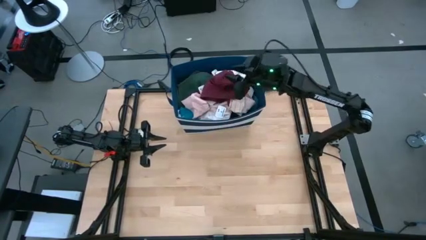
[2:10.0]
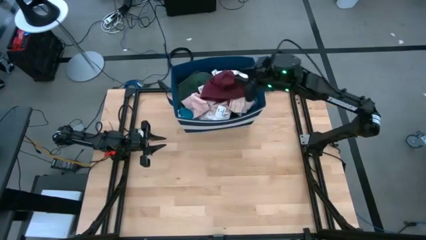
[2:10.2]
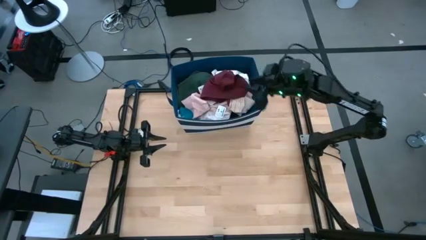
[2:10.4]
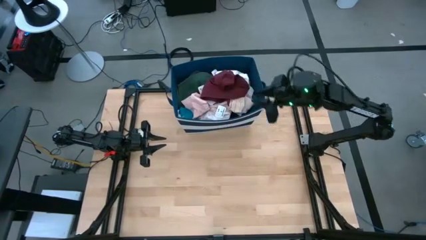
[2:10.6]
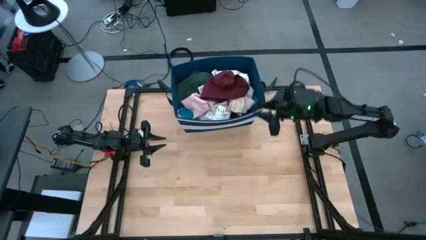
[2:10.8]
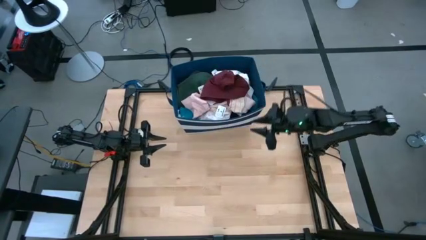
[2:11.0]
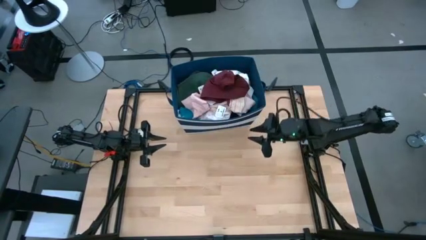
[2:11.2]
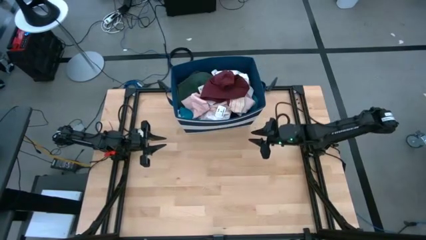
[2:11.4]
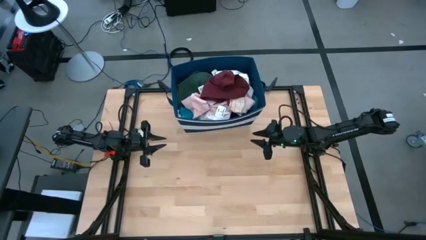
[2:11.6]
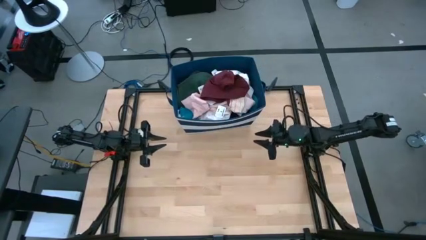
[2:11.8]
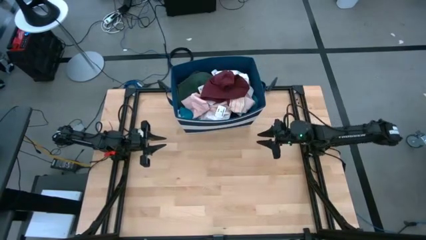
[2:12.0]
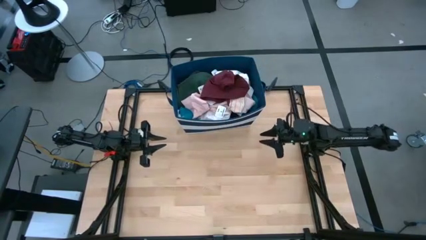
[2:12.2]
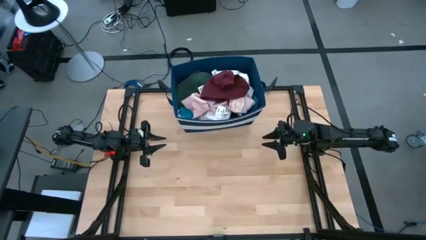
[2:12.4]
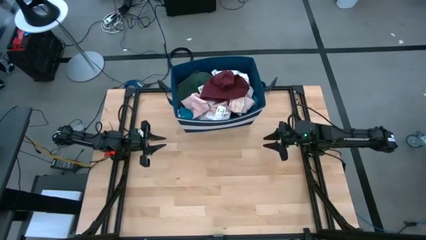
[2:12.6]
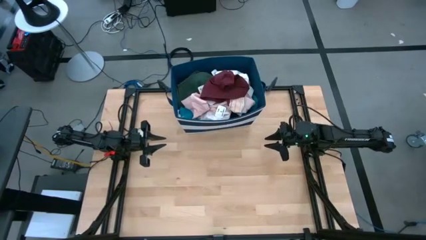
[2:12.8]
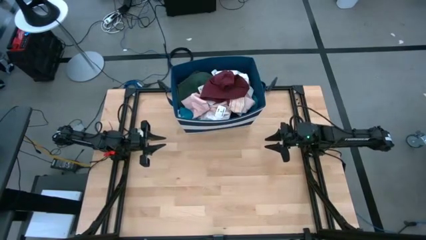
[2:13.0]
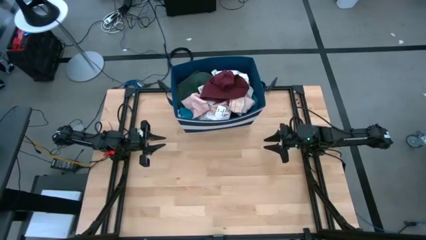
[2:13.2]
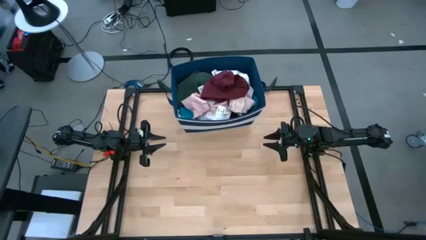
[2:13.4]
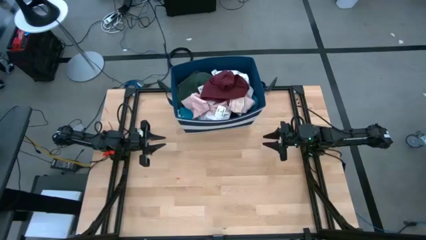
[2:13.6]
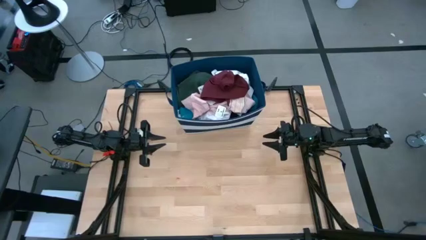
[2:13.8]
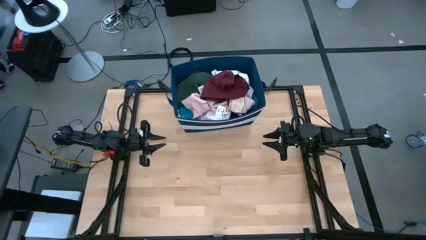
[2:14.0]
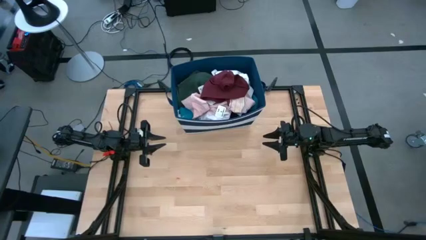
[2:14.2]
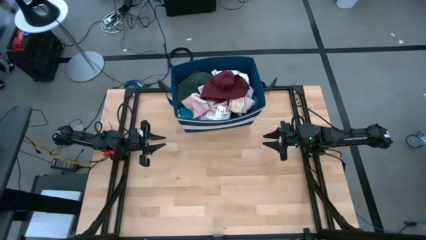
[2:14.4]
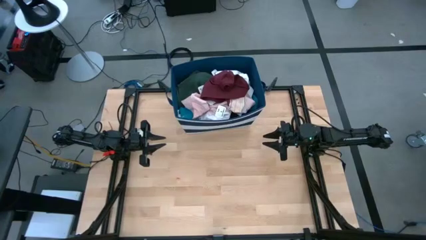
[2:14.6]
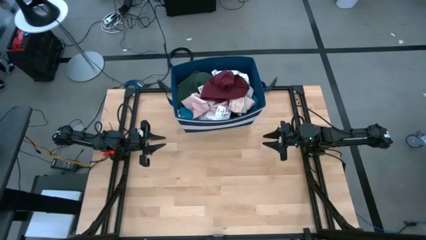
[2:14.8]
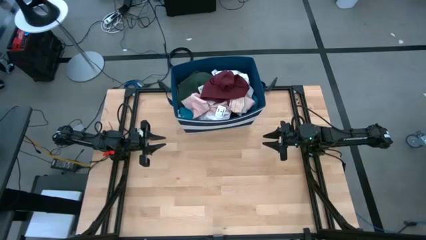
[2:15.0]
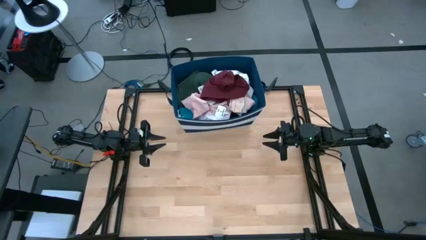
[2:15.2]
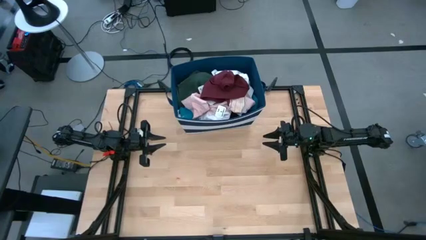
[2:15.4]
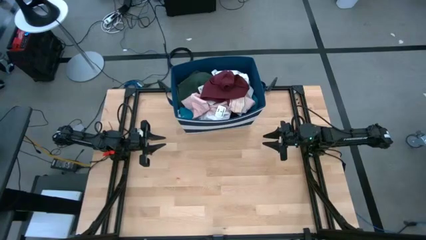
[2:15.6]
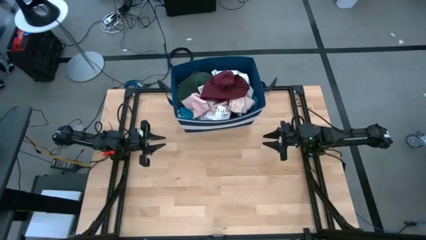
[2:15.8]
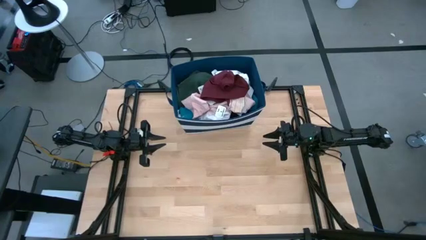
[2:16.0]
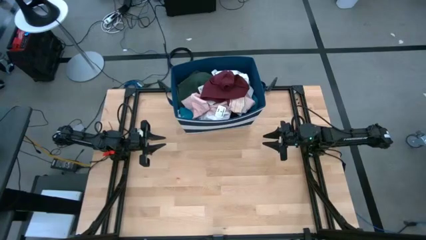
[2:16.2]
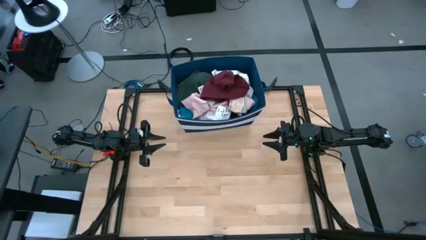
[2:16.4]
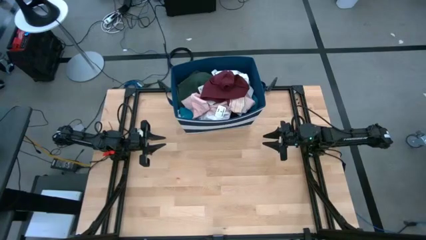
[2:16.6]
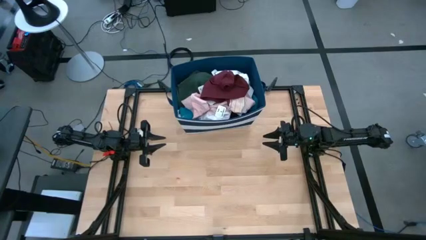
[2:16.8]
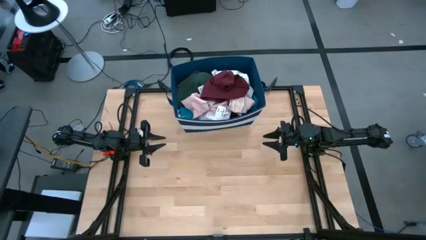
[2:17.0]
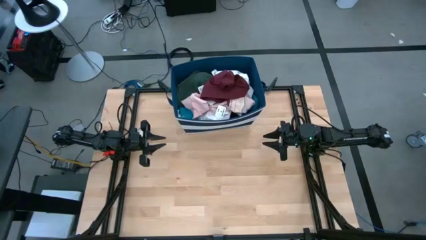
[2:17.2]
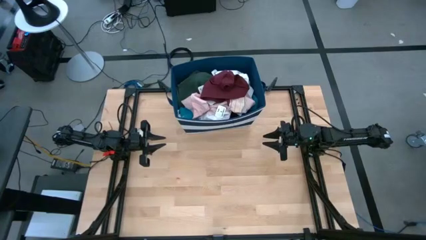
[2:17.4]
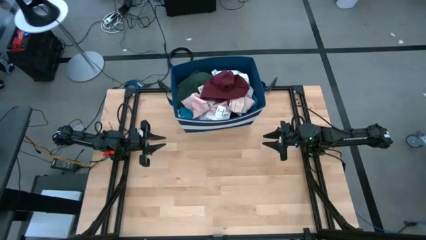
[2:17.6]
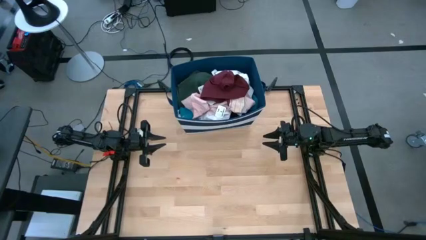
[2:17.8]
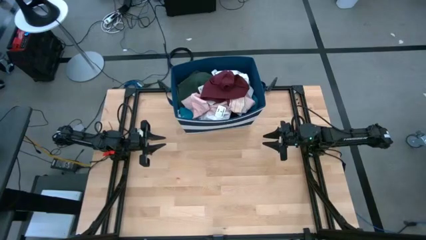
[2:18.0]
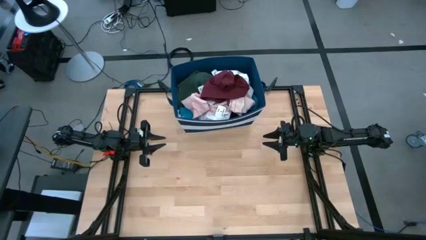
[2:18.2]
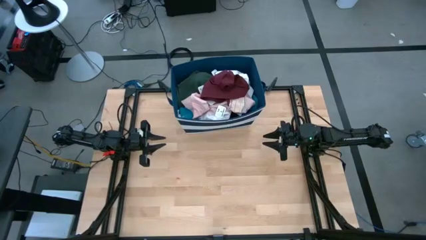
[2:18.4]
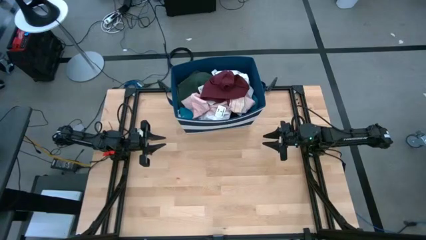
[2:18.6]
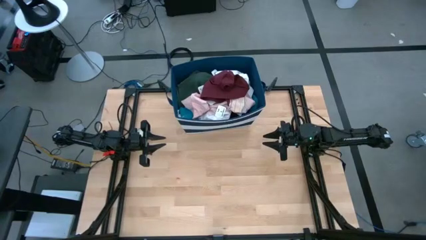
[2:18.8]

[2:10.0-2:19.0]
Task: Sort clothes
Return to Home Position

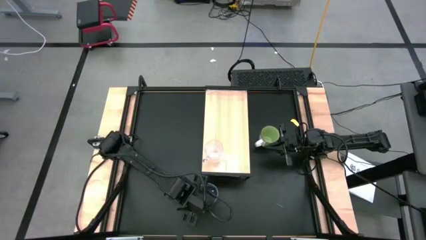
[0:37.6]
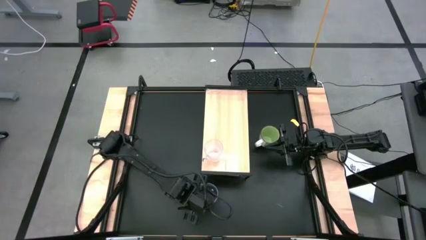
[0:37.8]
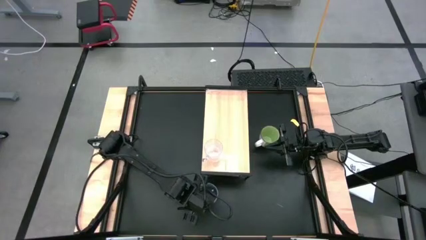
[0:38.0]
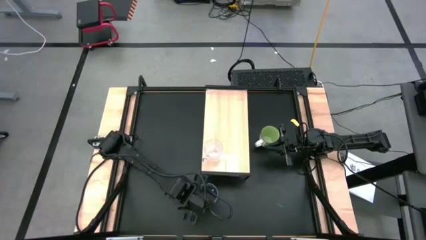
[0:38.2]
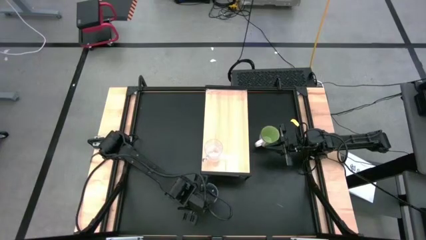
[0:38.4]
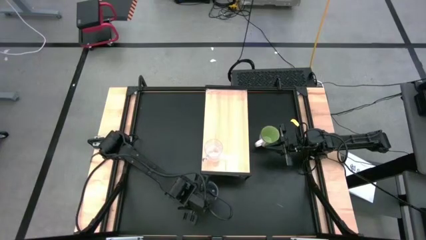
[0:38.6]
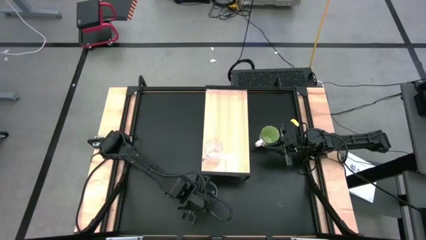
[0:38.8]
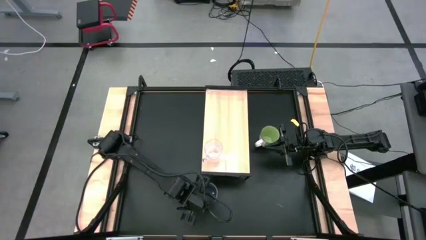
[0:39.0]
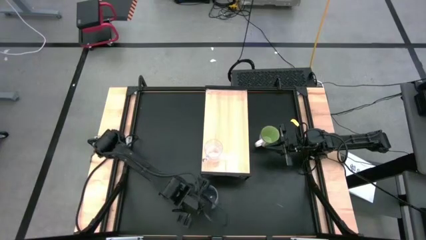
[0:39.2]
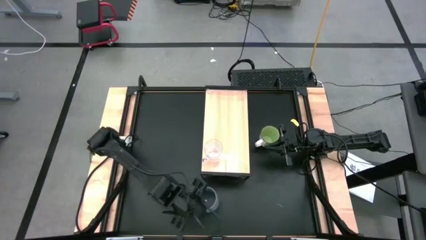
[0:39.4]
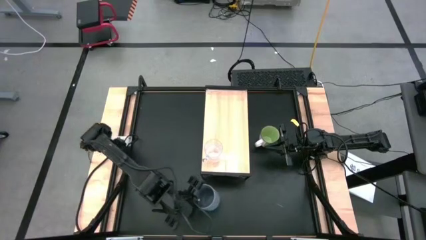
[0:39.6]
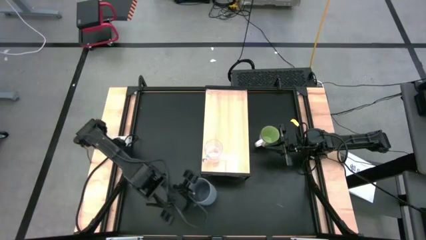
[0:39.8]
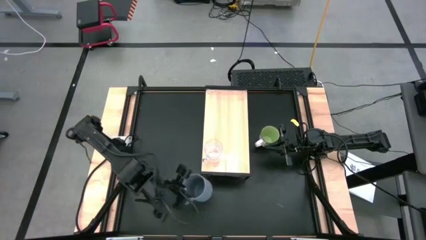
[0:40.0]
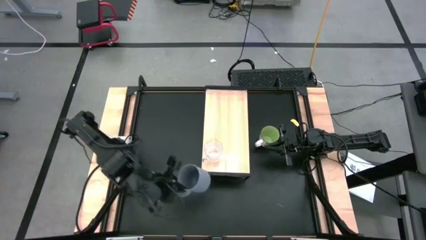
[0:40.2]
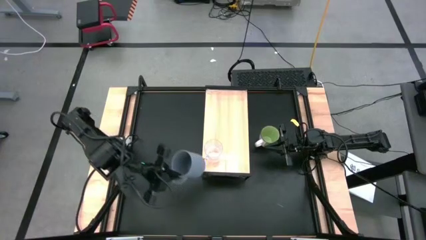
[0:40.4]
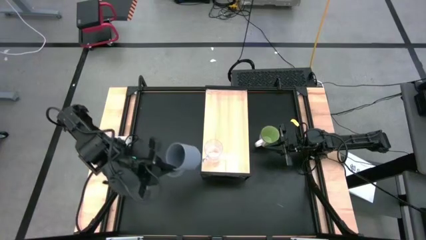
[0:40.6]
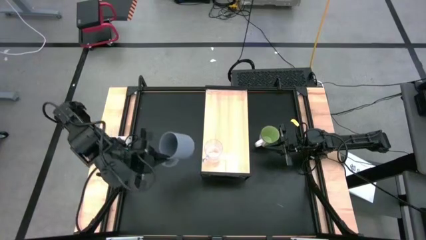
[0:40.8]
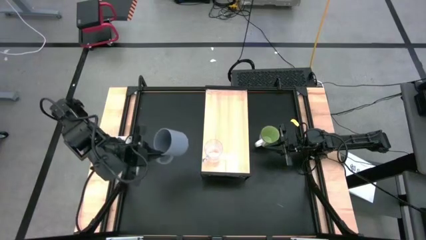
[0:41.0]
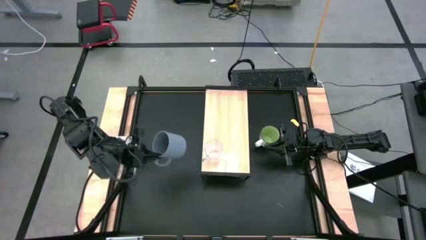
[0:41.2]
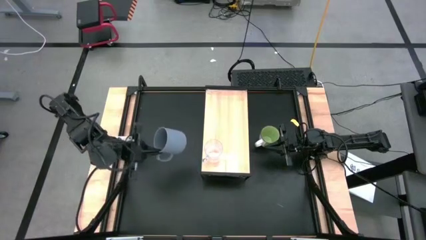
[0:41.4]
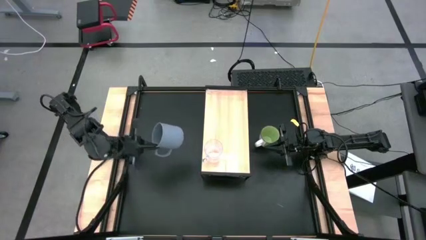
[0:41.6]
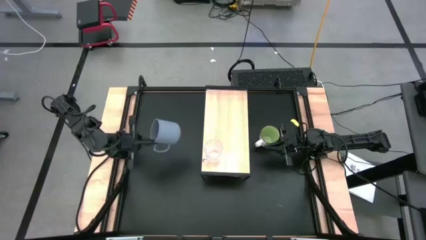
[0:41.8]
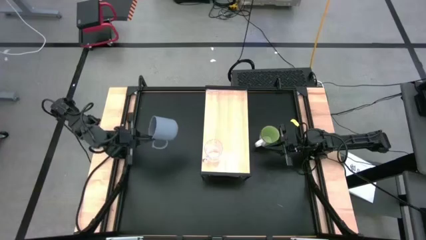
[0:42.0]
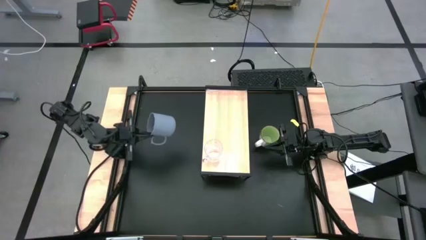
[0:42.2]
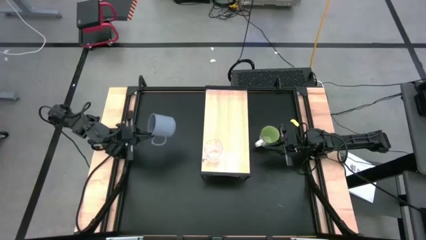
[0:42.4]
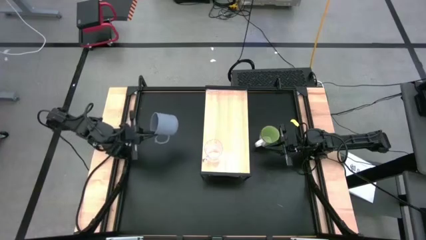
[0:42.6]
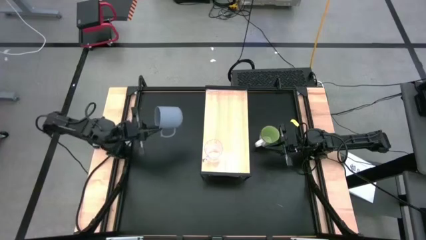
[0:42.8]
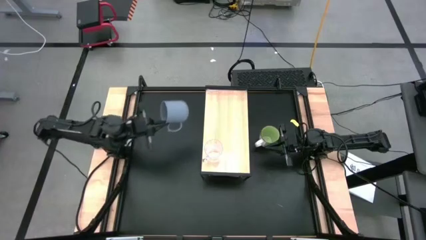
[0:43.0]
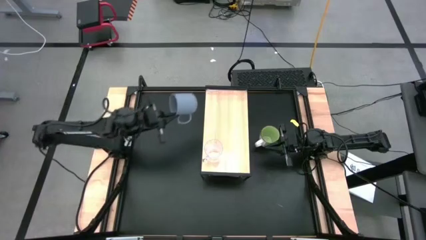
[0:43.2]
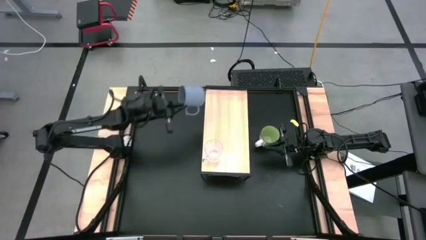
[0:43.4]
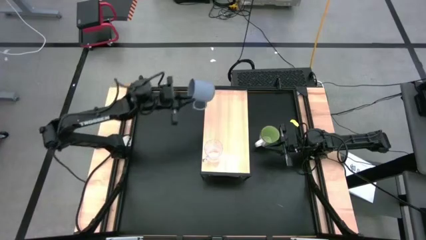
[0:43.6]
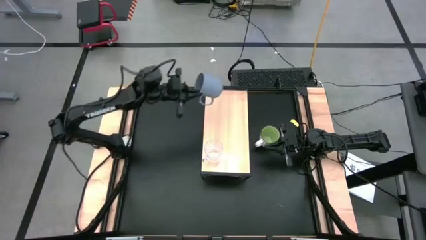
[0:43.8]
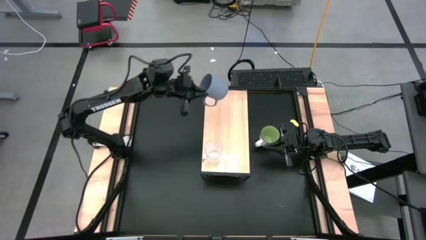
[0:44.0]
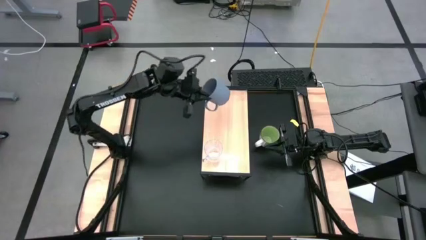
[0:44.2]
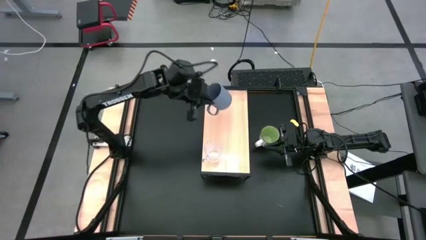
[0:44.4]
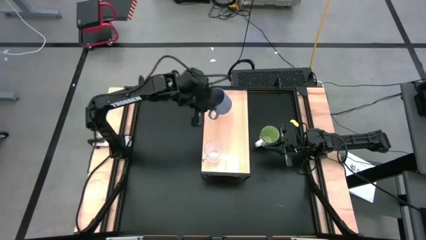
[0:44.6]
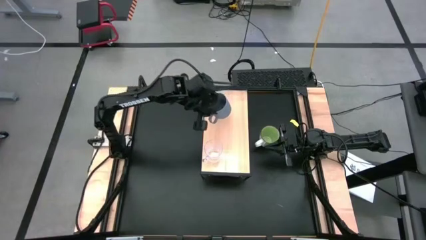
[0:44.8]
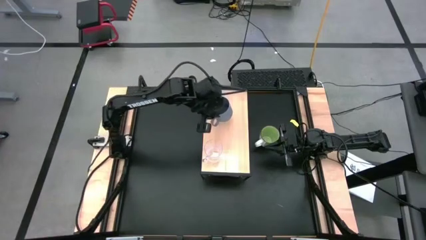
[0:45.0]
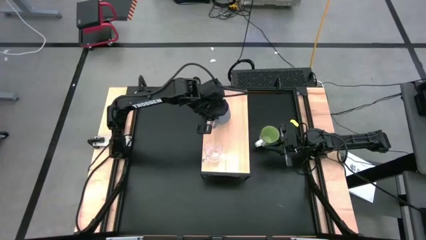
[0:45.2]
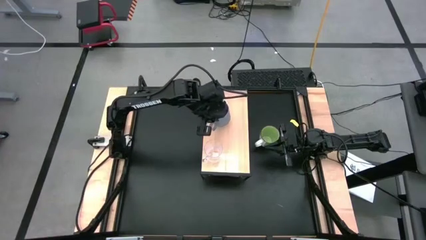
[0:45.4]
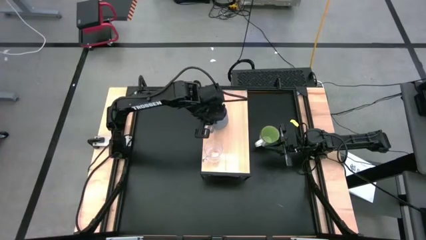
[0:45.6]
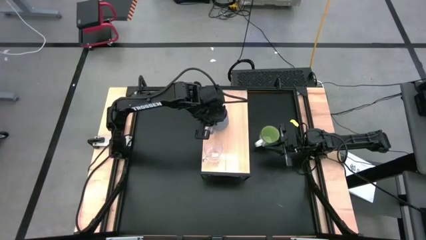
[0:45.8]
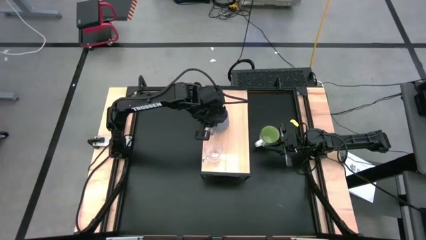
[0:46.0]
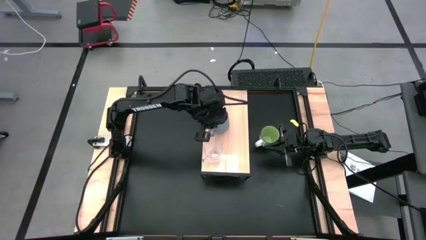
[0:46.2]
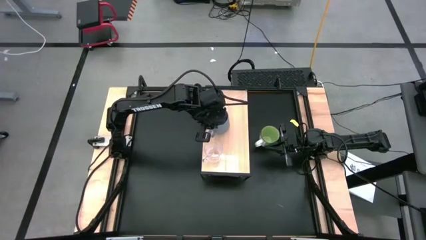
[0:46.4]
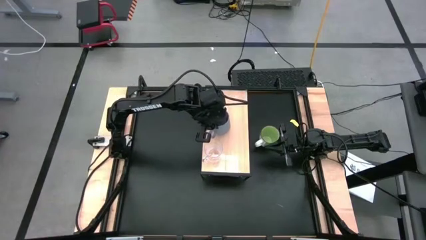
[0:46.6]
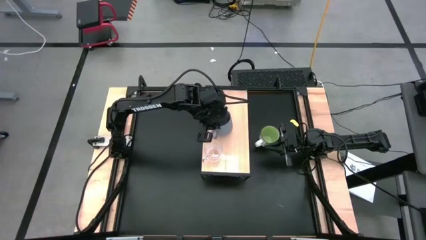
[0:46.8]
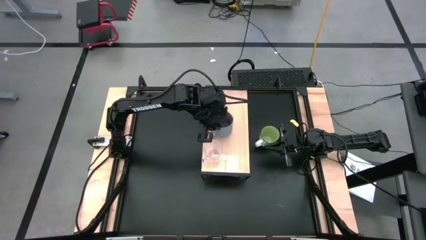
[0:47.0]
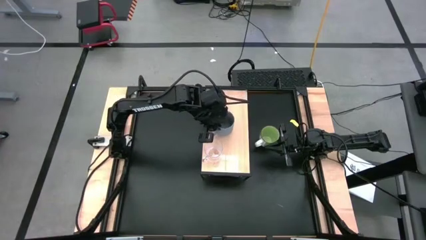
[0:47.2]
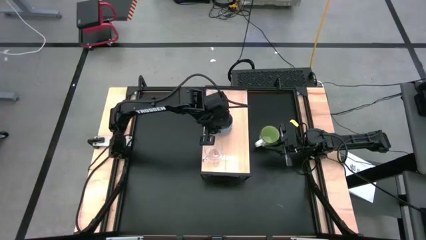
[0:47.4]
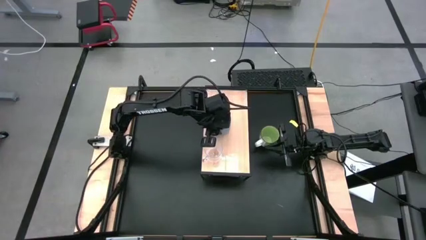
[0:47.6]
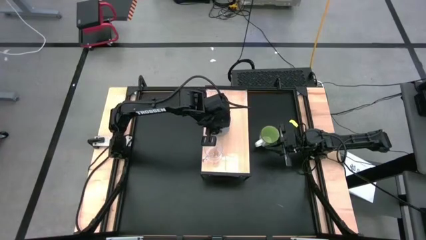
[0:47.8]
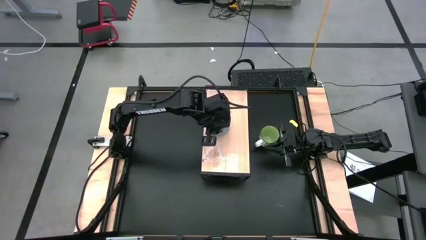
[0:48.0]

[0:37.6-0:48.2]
Task: Stack small to large cups/mugs on shelf
Put the gray mug on the shelf
